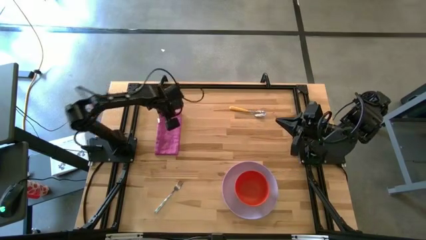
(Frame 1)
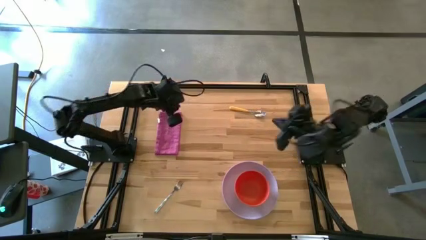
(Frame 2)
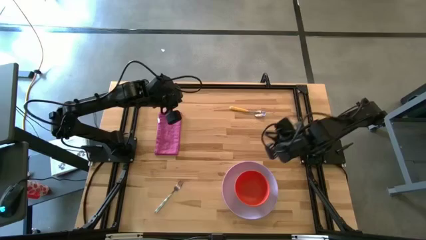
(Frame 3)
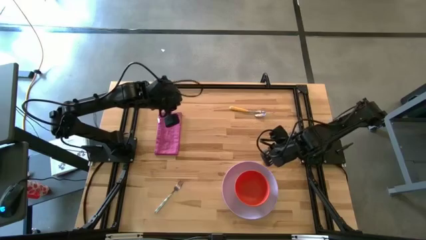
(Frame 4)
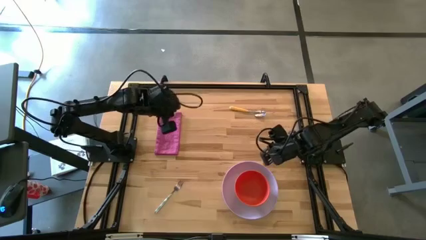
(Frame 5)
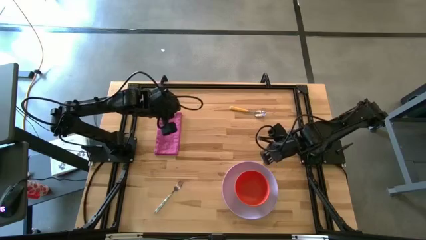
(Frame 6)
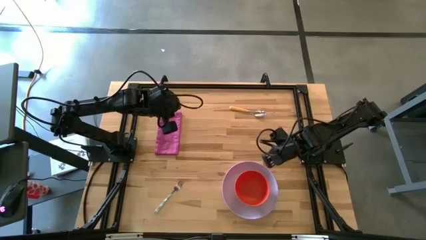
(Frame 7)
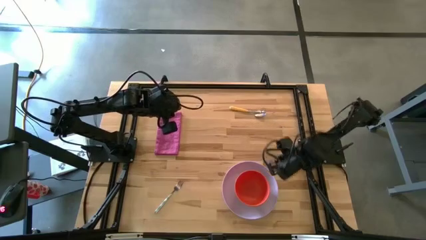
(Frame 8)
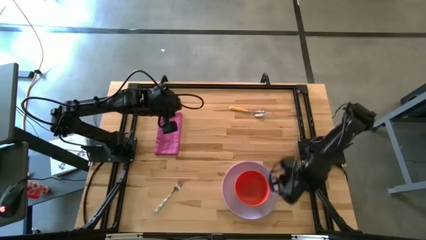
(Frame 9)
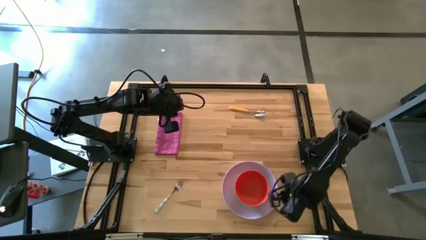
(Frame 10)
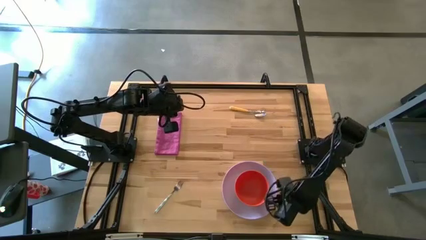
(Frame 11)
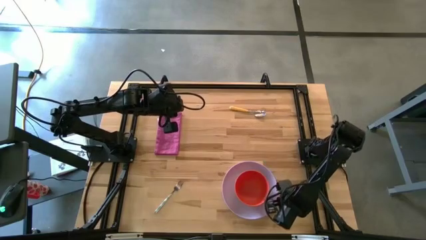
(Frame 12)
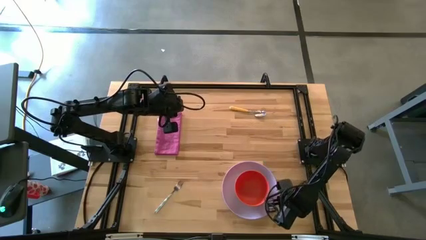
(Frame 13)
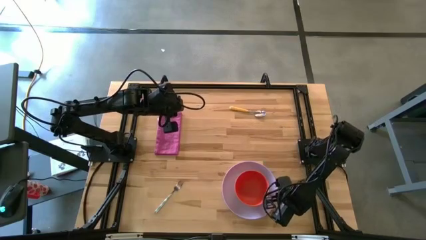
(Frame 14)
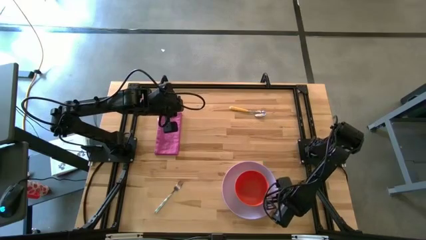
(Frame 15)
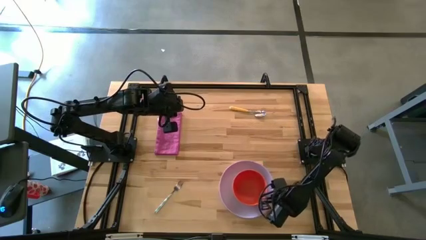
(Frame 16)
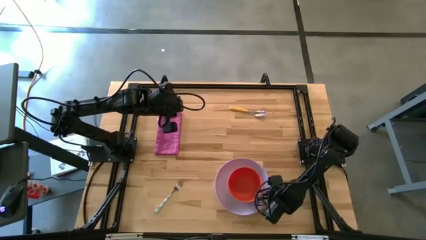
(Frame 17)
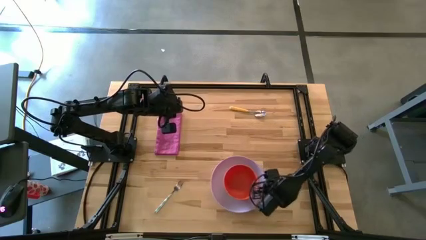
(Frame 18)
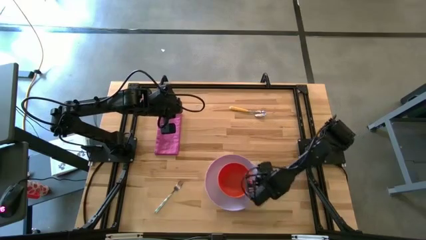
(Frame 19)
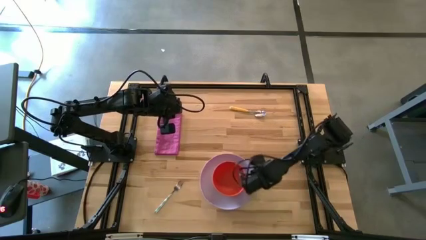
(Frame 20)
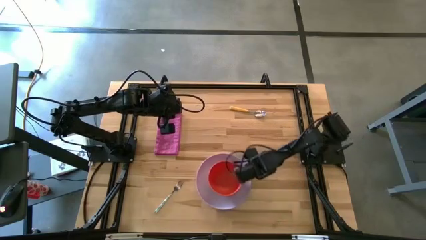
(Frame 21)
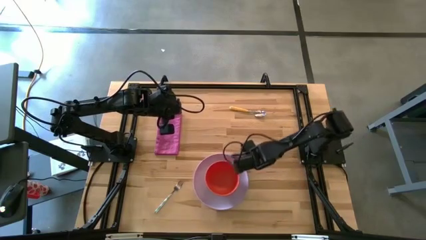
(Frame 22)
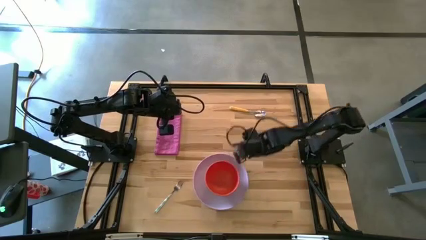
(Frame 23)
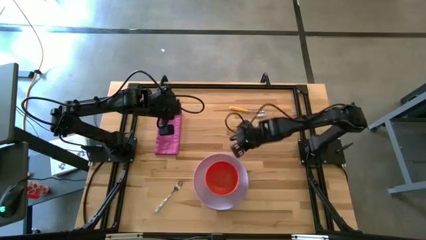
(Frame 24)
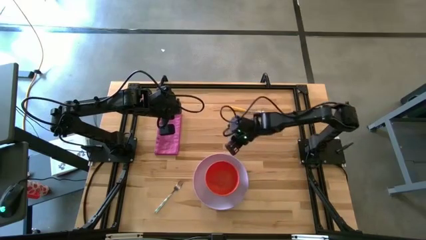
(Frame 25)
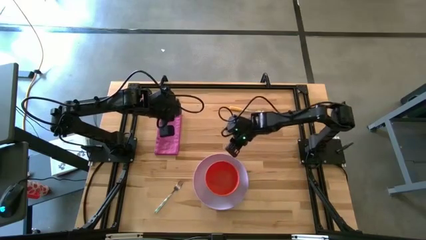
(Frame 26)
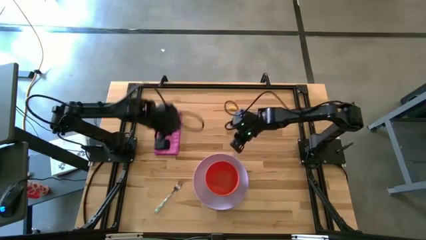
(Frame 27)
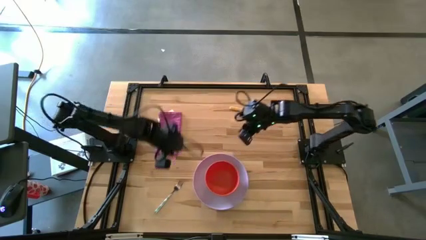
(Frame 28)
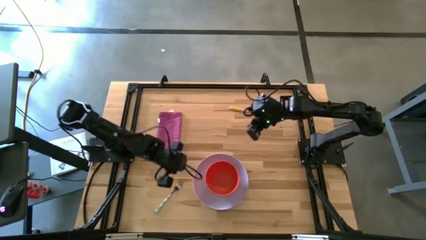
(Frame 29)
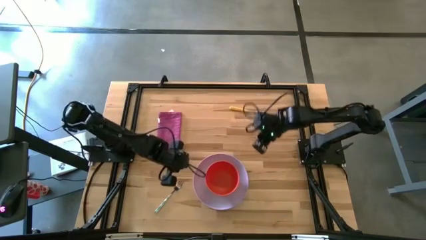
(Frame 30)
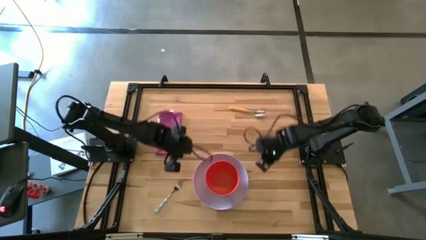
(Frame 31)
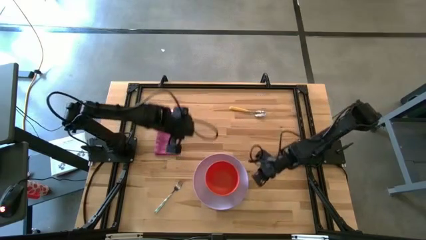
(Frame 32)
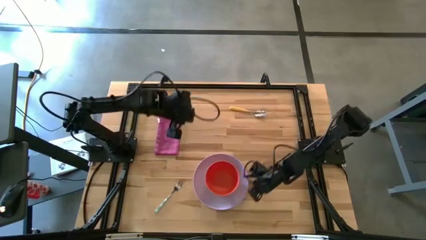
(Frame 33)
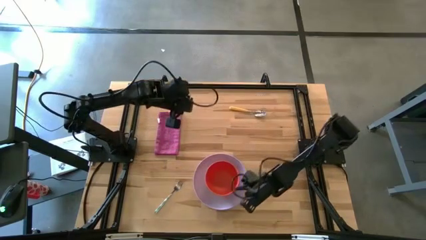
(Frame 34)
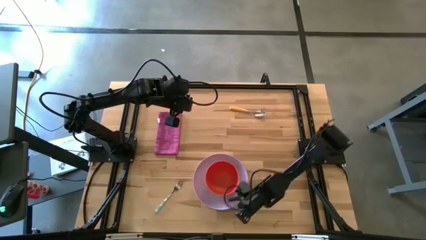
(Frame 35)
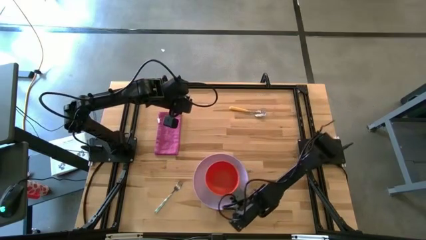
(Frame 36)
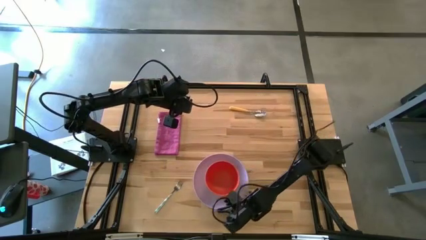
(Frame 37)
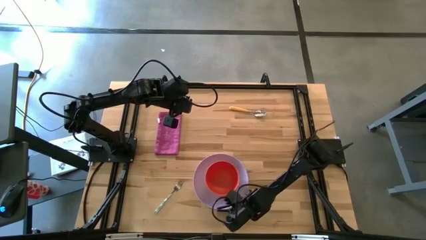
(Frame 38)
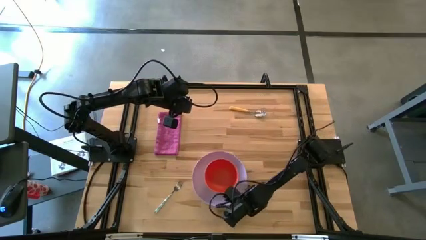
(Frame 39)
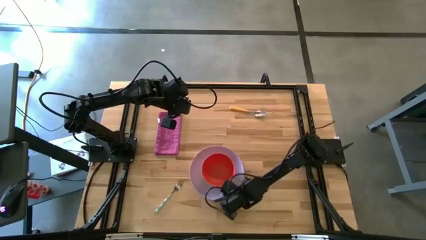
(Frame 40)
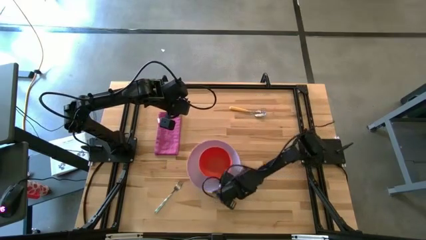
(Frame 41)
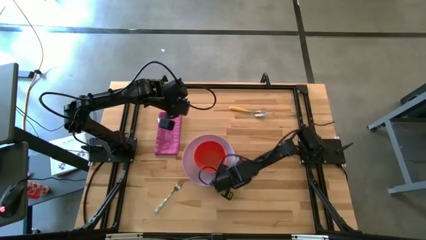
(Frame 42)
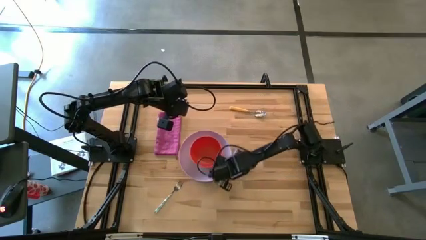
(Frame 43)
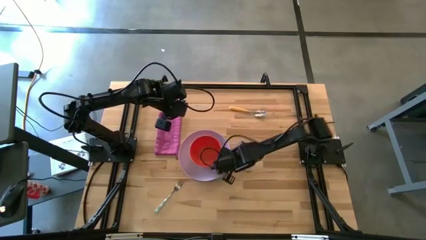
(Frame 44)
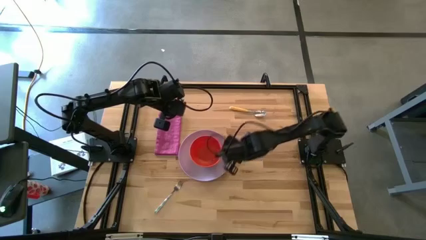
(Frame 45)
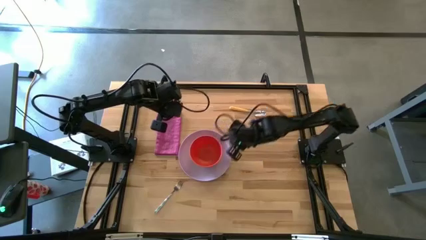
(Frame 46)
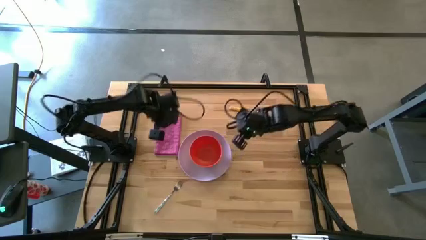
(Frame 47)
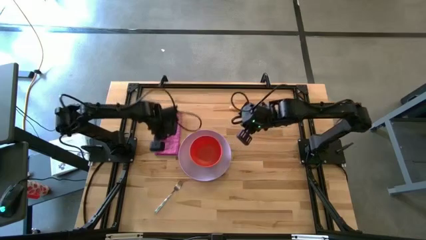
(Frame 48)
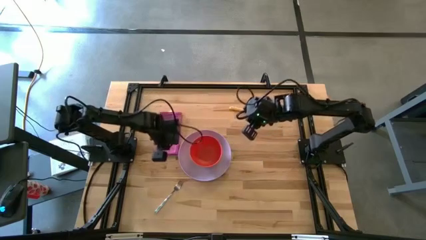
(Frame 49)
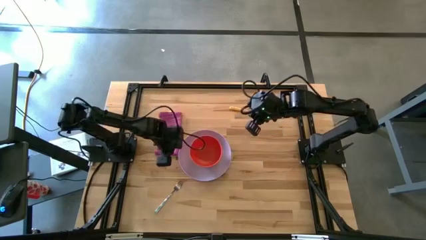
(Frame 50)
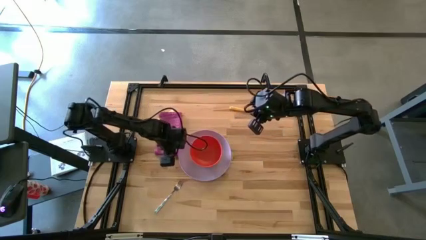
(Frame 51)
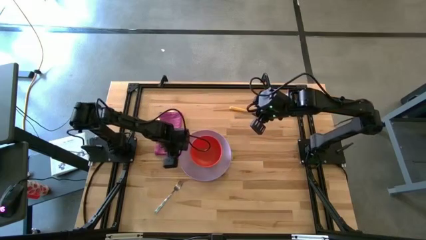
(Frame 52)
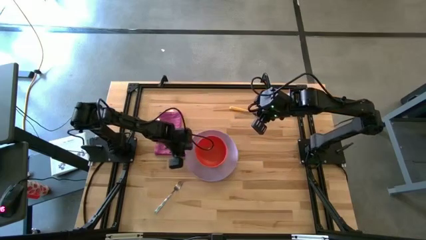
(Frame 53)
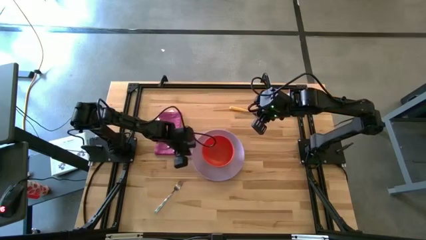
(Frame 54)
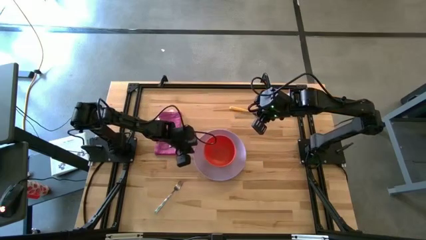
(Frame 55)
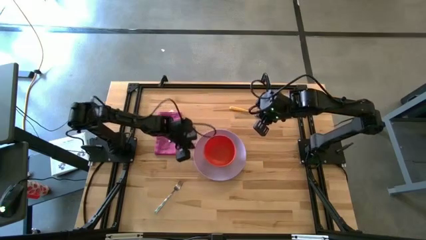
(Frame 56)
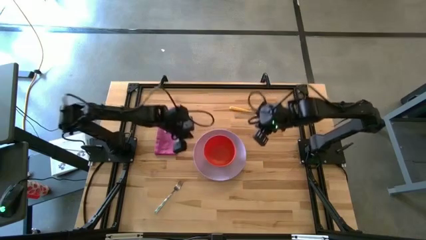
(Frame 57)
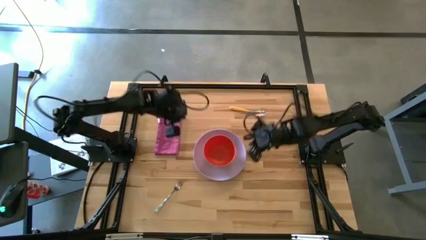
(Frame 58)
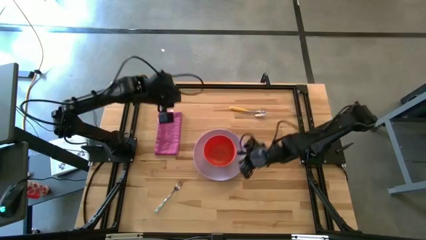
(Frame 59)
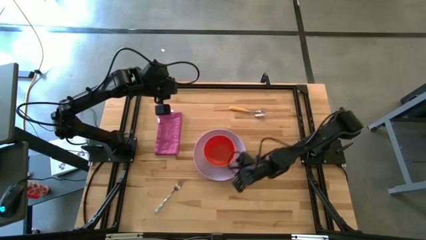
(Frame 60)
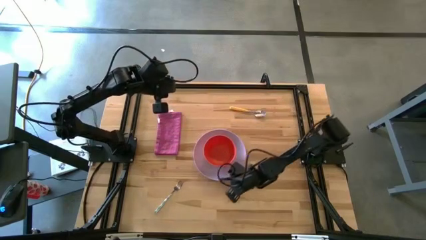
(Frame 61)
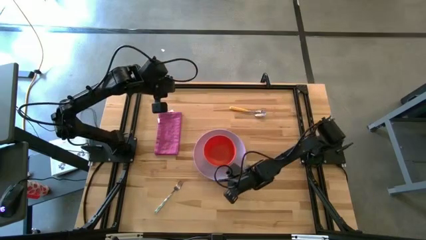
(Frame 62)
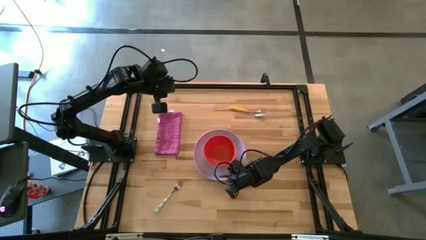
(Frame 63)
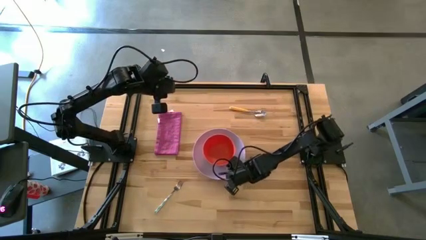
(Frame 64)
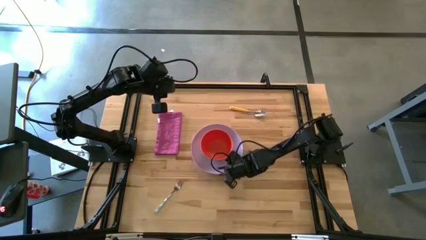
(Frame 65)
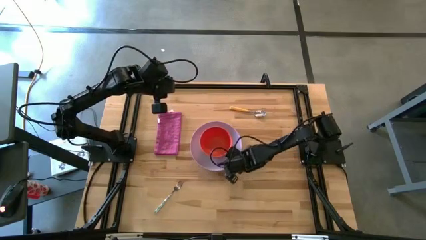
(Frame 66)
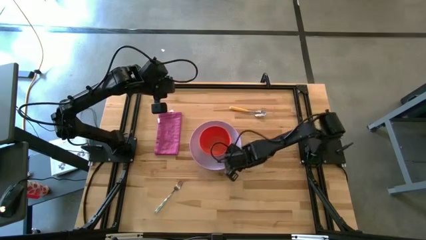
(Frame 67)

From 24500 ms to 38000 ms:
Task: Set table place
Move the purple plate to the right of the purple napkin

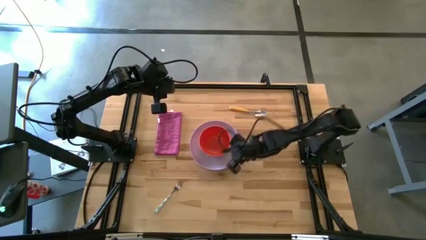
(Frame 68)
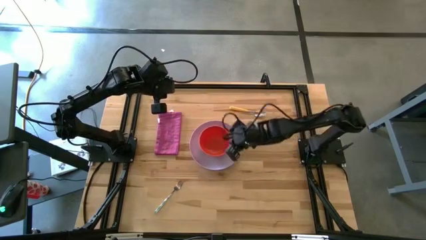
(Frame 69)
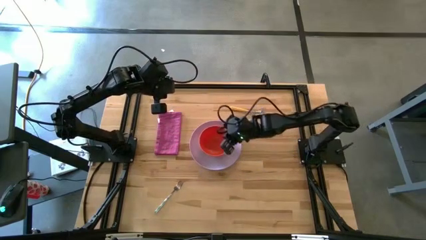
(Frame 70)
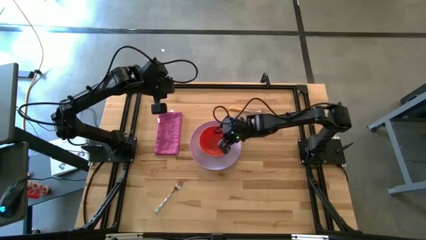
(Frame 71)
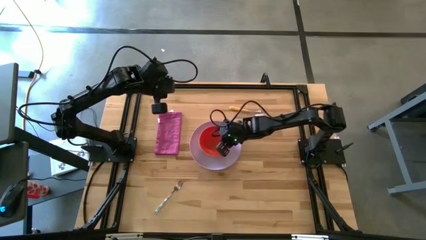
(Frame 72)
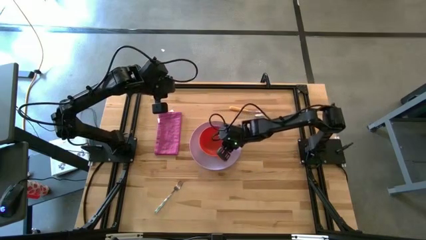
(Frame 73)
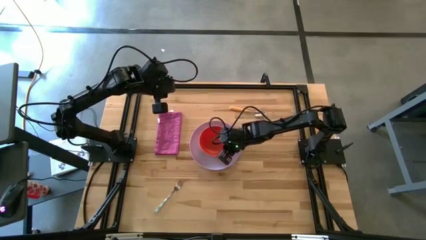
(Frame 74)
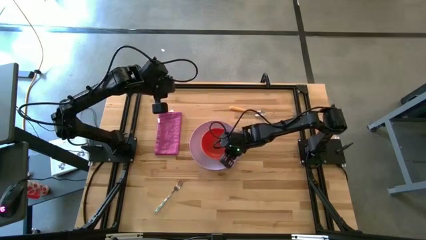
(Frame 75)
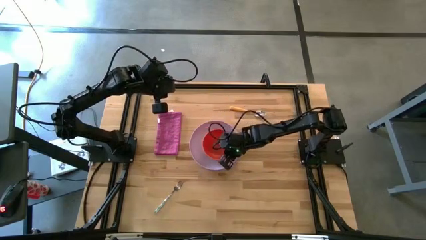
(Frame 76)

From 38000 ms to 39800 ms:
Adjust the orange bowl

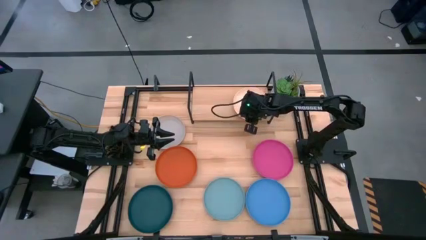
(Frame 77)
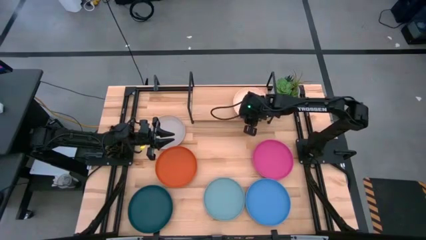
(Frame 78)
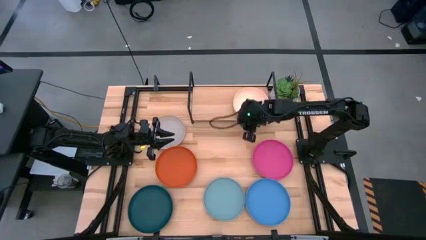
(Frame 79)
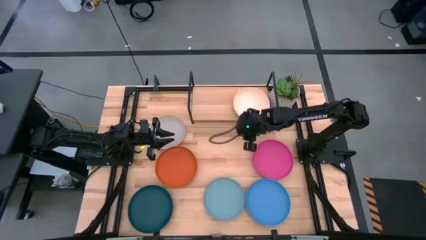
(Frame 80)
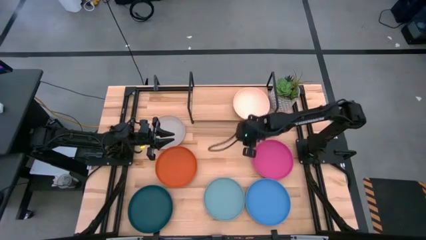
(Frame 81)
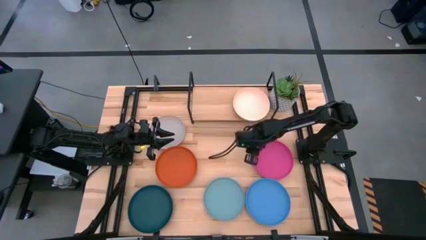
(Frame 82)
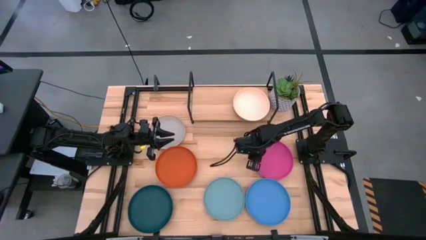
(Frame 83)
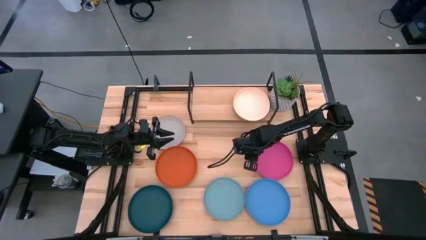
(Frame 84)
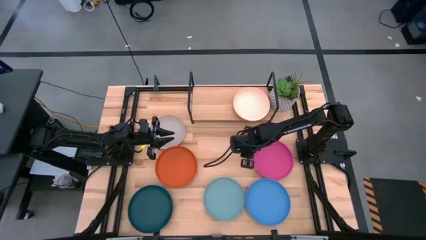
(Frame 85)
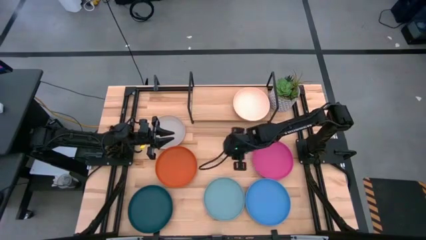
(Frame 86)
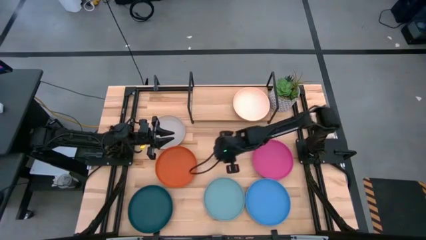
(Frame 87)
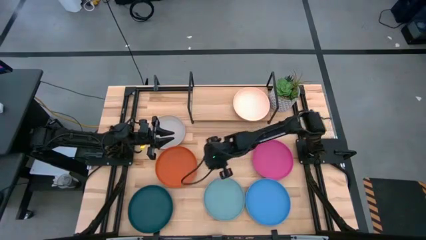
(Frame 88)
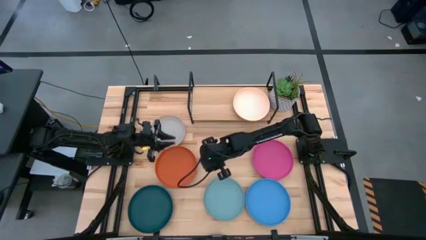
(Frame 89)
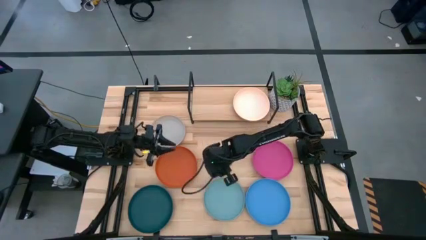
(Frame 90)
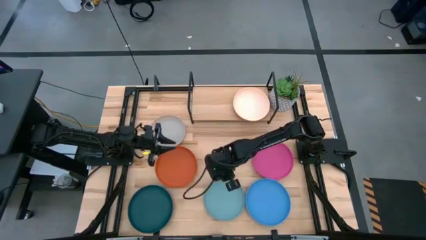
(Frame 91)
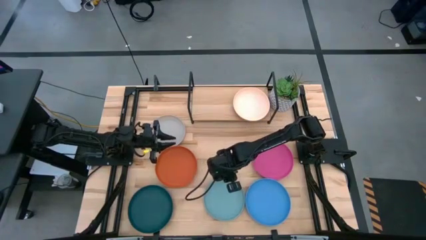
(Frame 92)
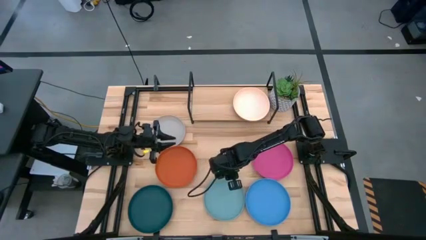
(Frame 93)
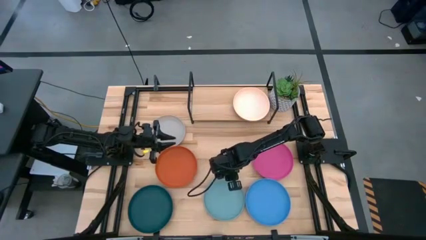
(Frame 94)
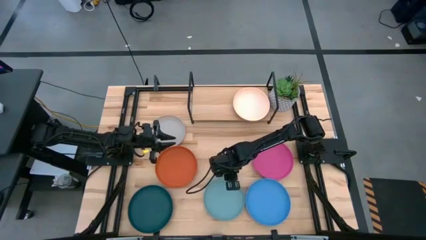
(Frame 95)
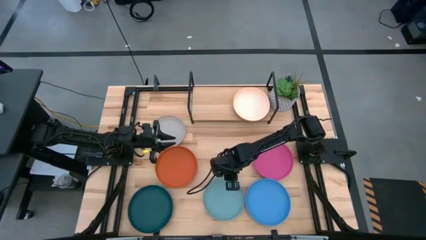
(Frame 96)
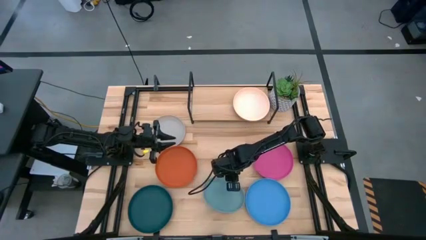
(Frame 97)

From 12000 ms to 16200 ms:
Task: Place and stack plates onto a shelf
Put the light blue plate on the shelf
